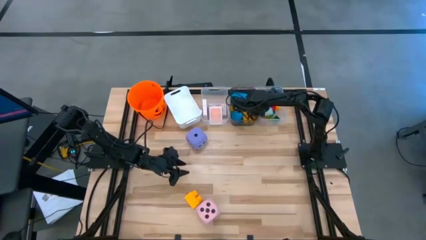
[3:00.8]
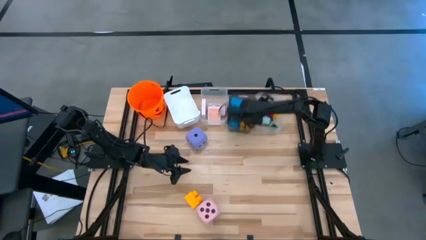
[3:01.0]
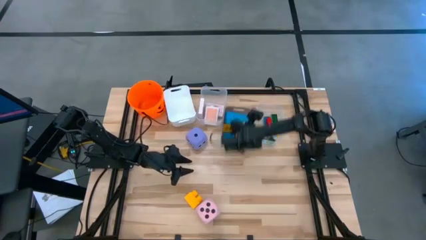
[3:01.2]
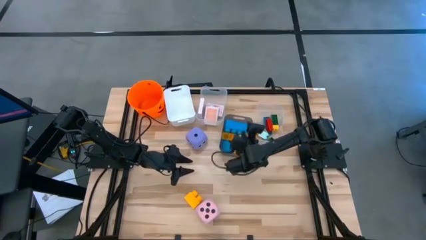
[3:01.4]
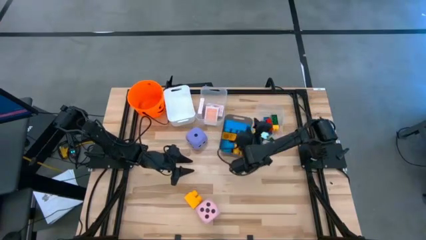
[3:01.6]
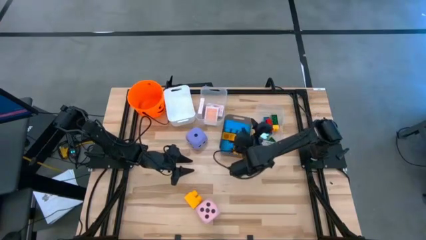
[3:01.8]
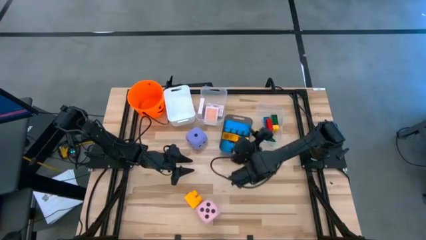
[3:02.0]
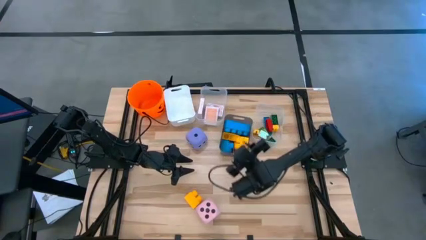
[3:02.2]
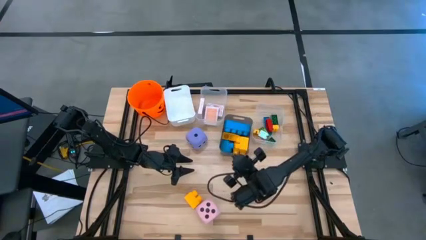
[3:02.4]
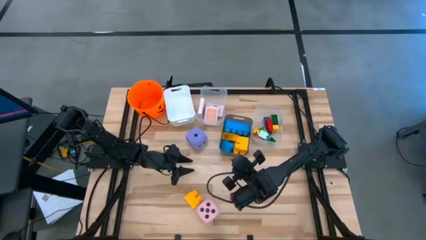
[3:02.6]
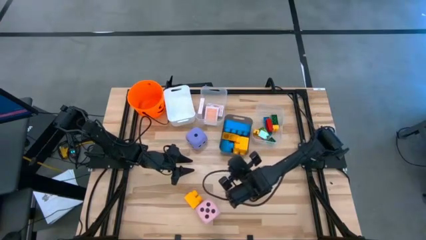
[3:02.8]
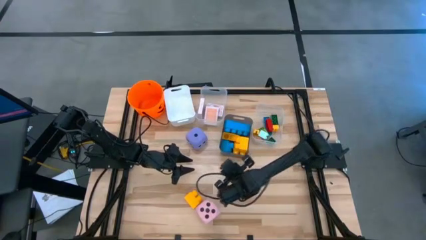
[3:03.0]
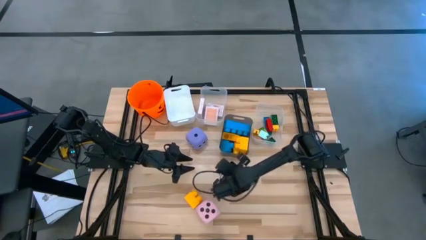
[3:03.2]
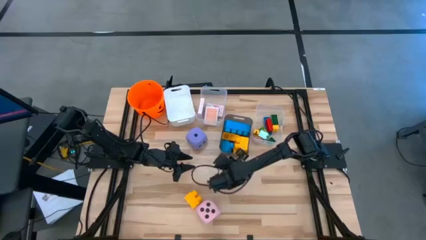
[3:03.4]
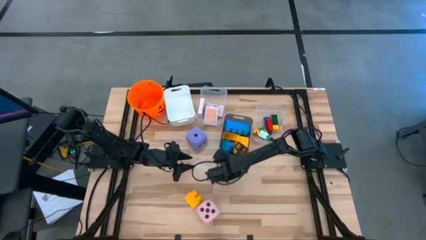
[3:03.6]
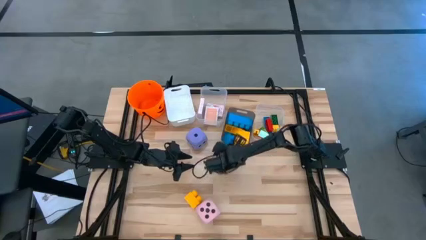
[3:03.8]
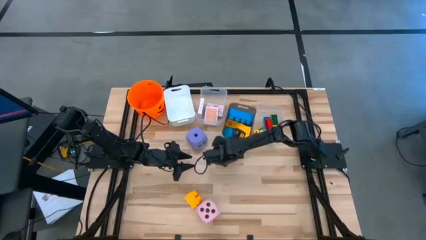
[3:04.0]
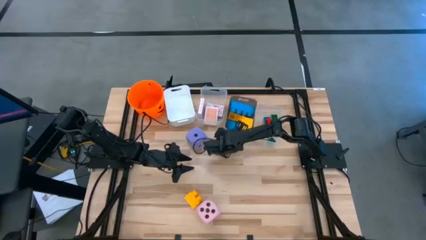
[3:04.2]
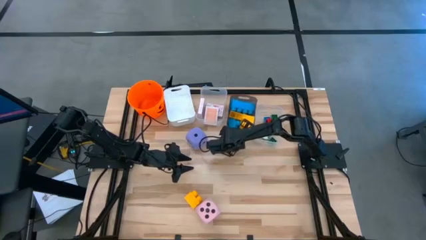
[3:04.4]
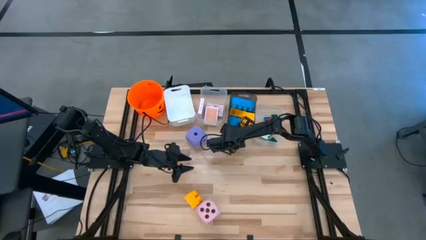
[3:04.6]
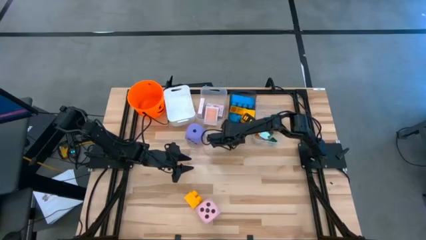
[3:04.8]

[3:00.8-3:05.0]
Task: Pick & Place Toys
Move the black bin to the top of the table

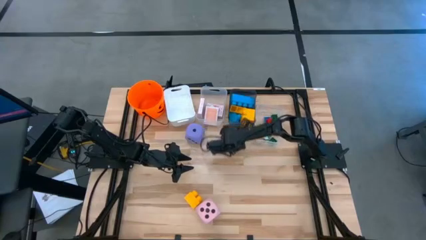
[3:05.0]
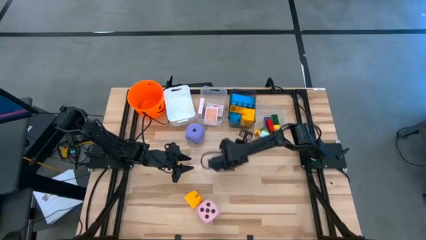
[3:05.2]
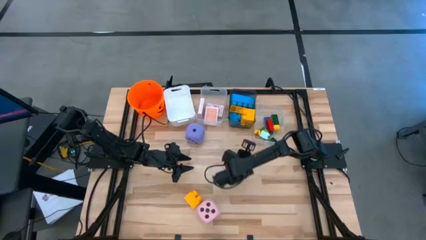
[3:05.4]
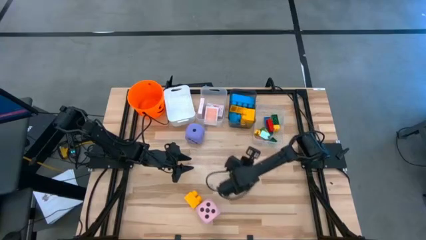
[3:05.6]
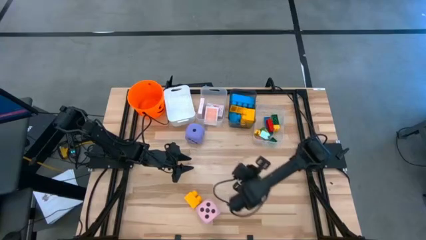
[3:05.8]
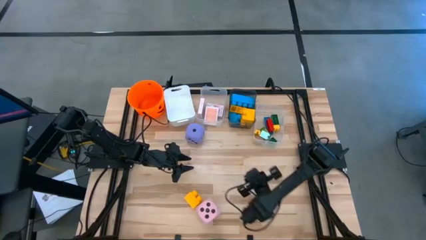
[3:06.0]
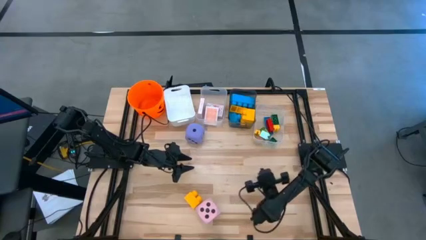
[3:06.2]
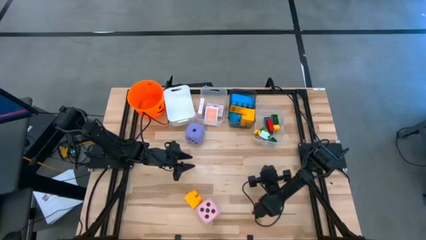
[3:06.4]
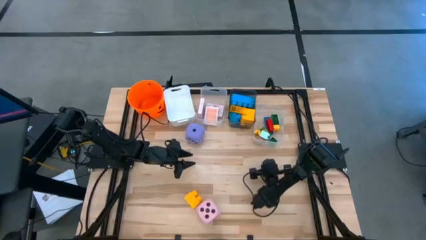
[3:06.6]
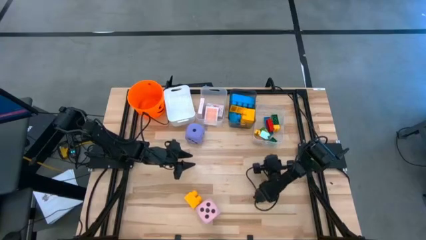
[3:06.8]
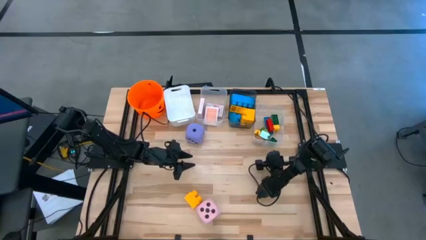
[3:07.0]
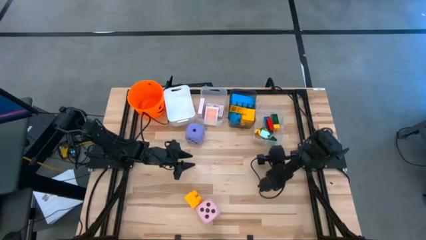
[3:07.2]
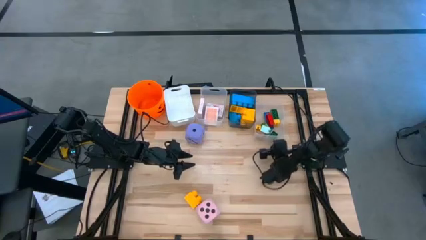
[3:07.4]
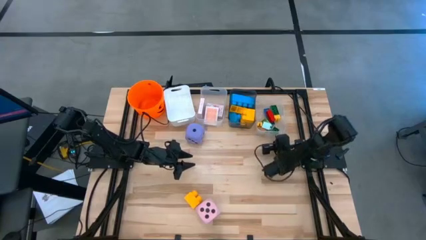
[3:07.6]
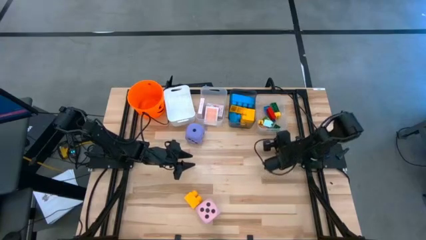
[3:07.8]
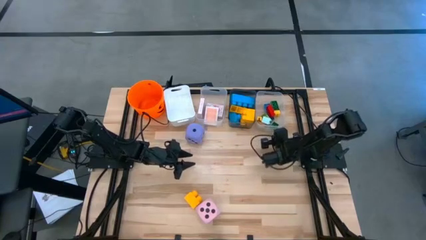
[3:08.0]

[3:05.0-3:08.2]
Move the right transparent bin to the top of the table

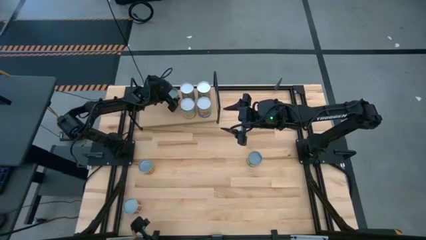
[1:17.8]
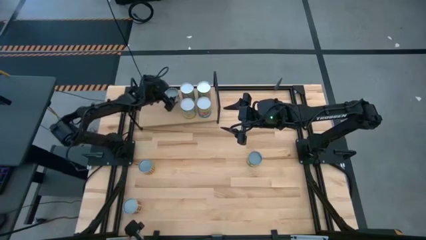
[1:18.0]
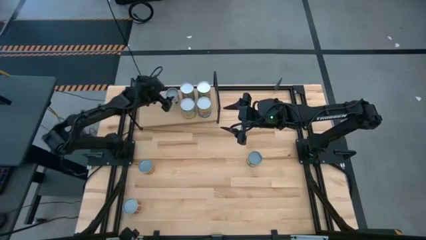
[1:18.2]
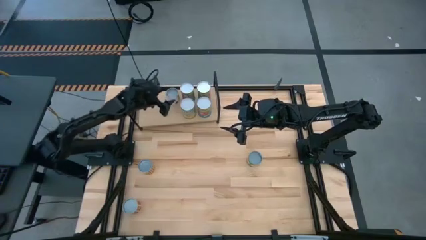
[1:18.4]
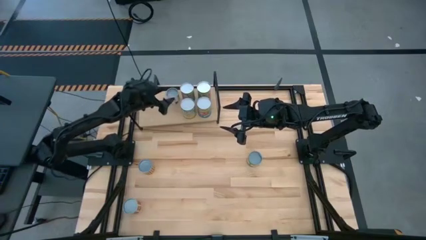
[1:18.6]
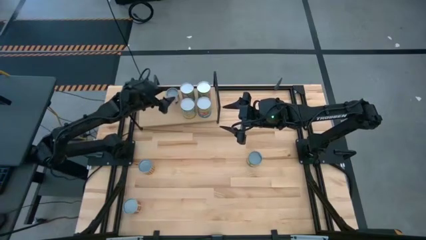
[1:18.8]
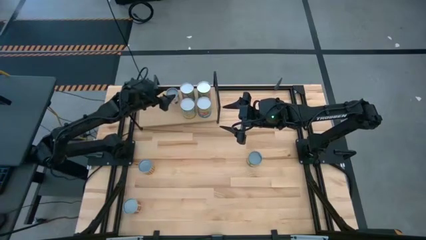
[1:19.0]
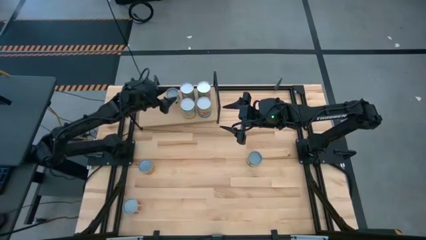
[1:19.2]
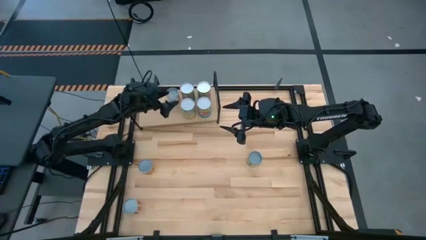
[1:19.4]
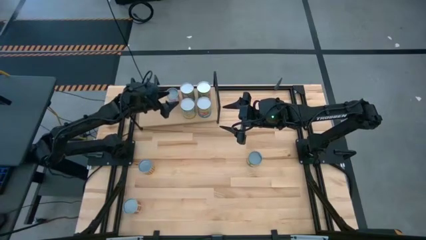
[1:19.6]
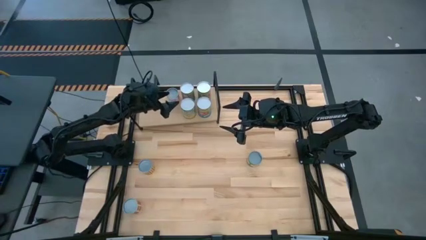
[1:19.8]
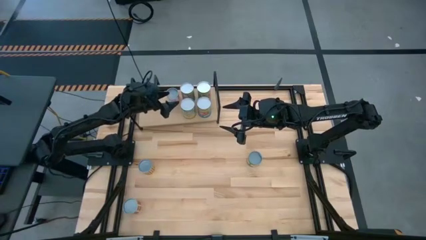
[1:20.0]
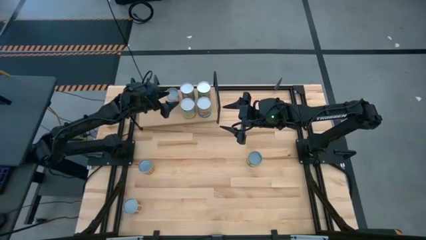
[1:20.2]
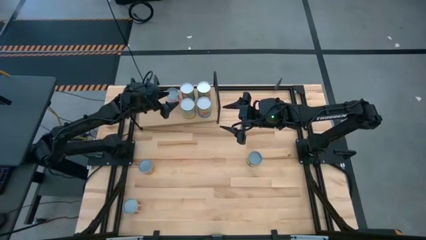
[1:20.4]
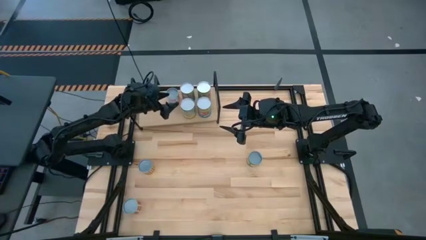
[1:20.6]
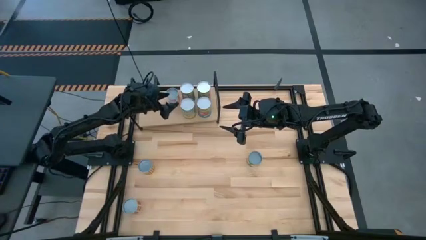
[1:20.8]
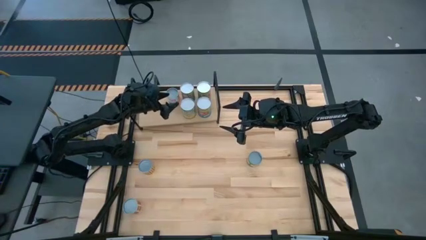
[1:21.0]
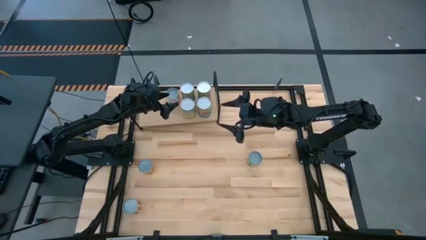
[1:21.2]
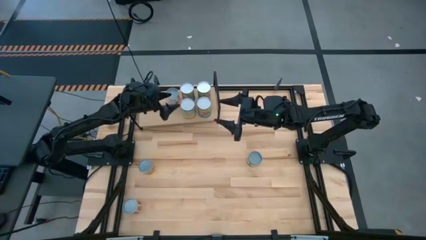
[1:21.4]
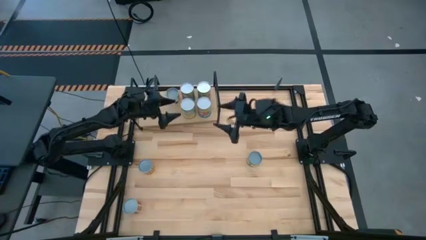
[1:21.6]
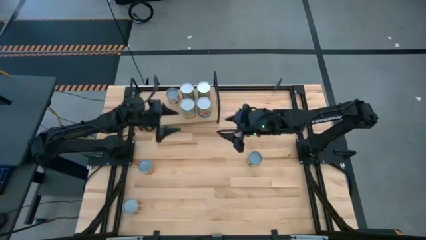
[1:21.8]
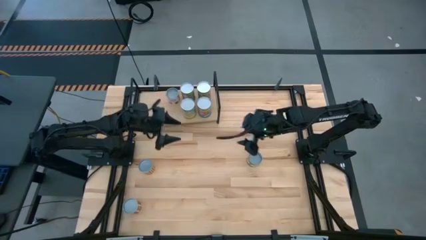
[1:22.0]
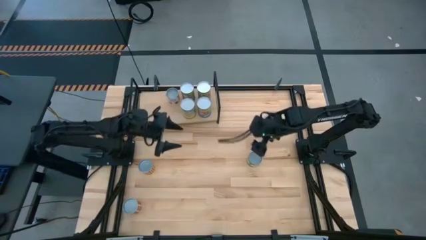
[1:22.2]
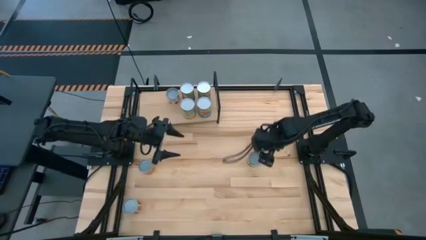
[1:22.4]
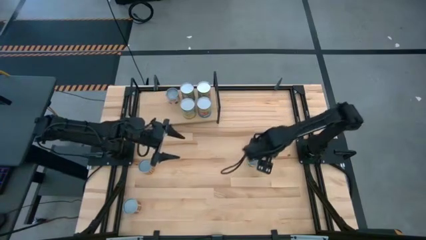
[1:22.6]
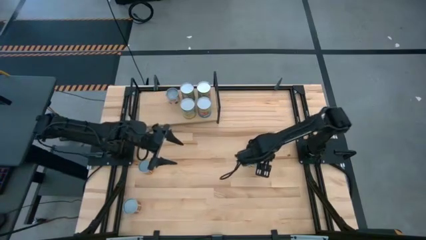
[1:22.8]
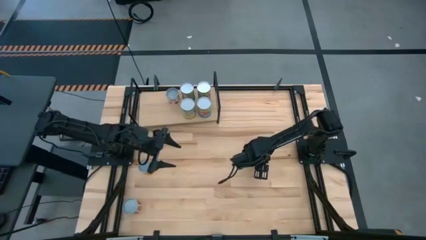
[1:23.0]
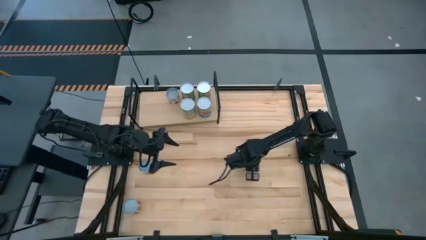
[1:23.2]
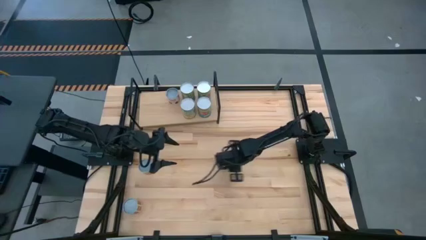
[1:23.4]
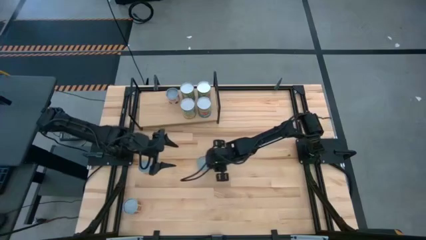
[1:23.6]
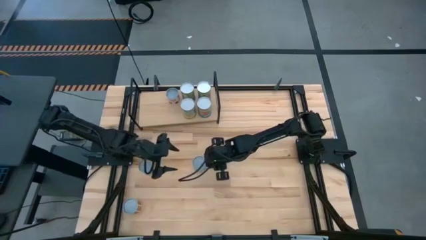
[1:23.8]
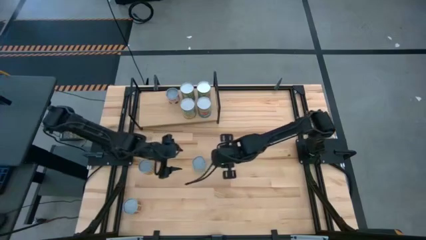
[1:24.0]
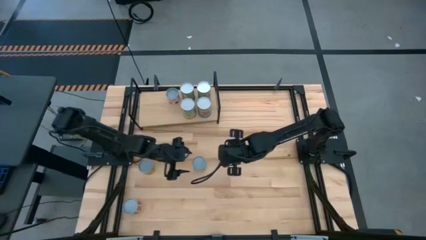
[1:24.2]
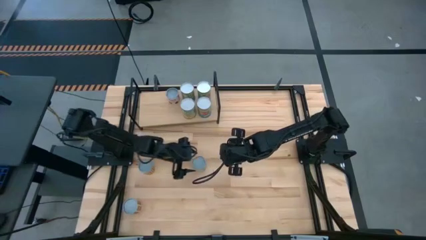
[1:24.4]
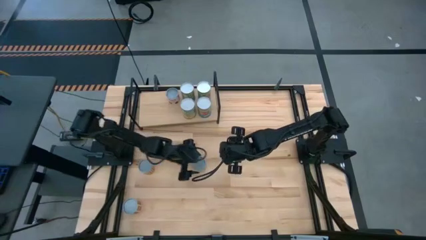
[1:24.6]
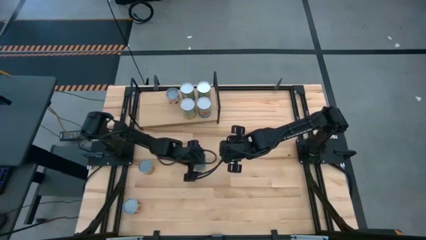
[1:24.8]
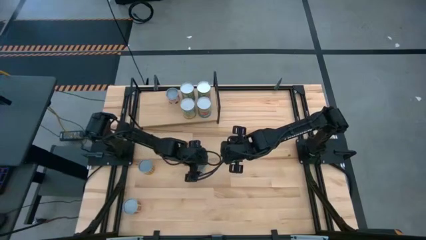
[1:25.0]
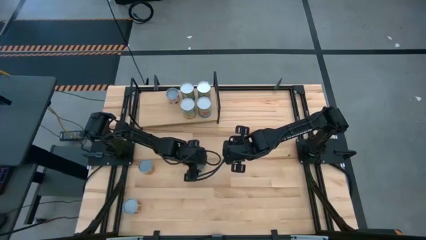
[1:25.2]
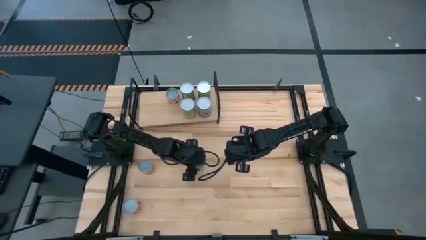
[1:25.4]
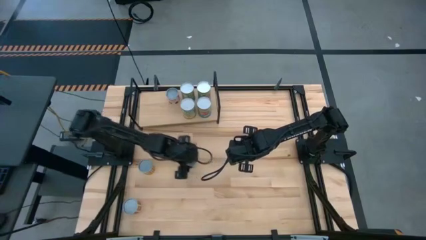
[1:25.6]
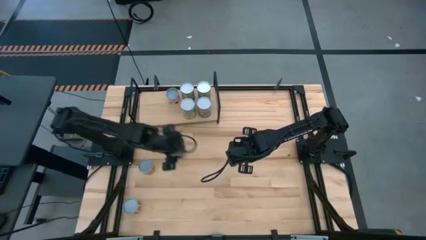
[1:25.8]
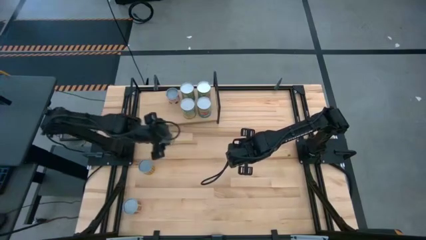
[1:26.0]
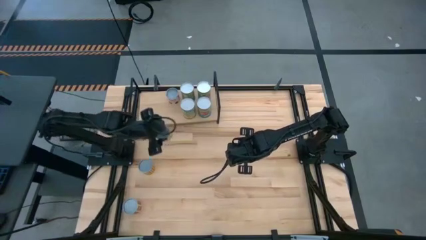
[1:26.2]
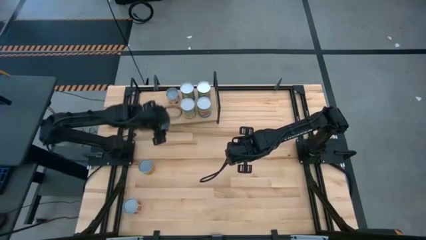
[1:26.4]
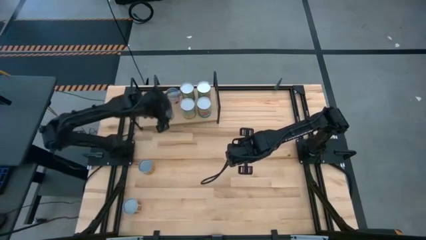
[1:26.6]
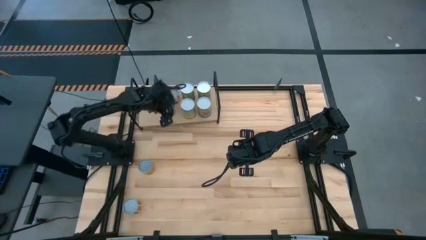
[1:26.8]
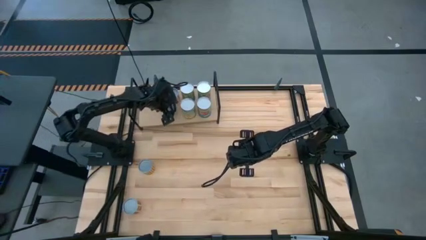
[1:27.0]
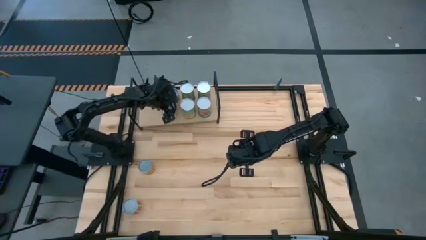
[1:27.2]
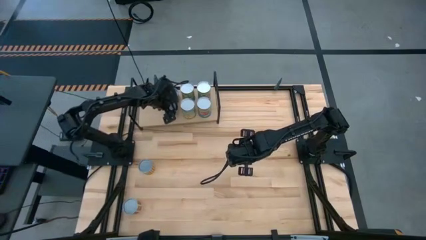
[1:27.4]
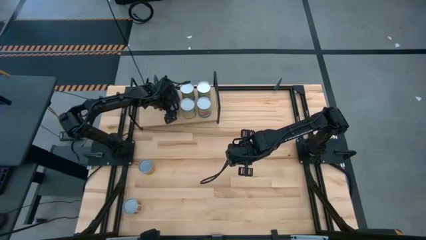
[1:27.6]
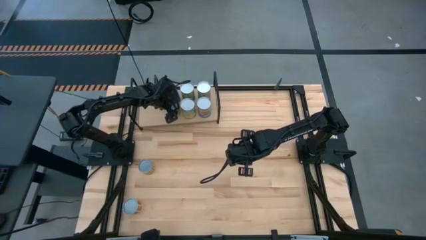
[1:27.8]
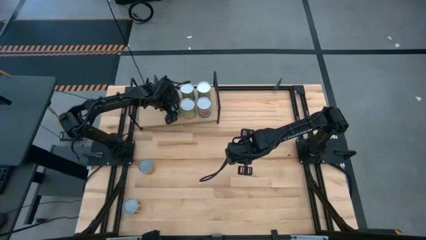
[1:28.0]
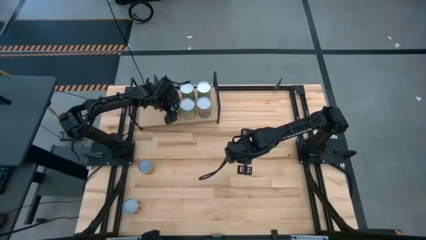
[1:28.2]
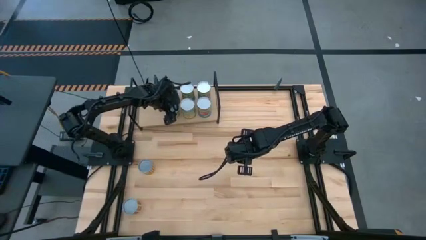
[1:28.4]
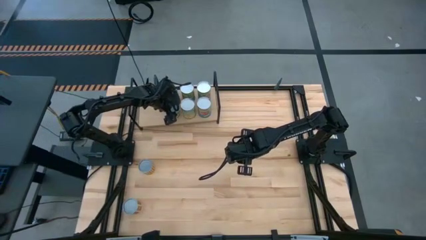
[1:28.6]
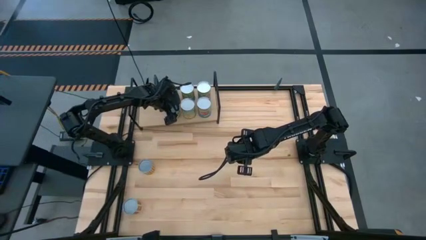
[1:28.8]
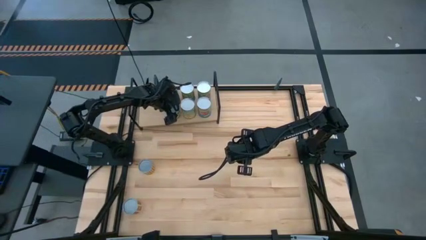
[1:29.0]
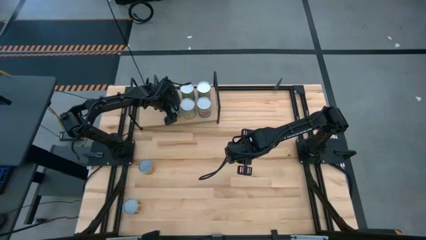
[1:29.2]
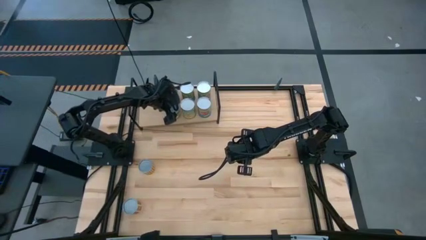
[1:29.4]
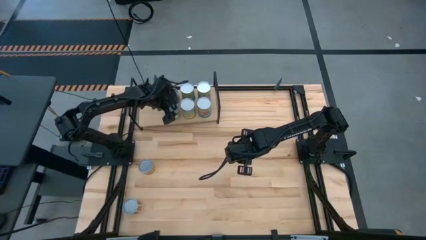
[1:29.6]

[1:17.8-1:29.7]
Task: Pick and place cans onto a shelf
Put the canned sliced peaches on the shelf
